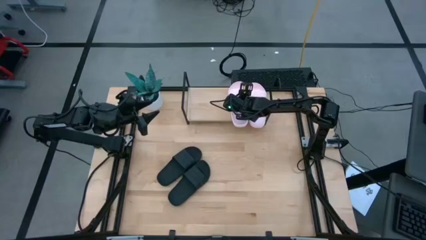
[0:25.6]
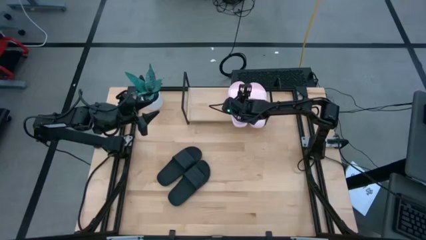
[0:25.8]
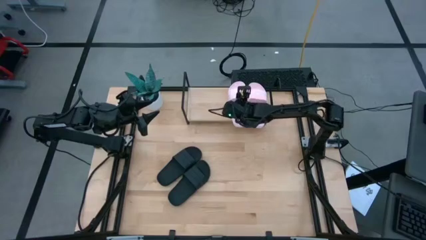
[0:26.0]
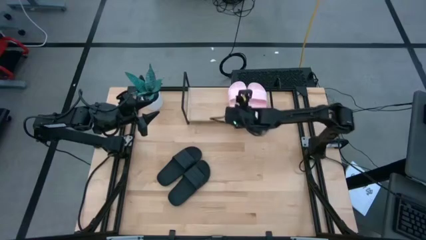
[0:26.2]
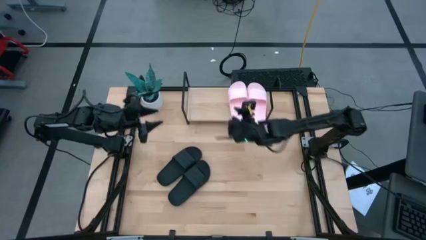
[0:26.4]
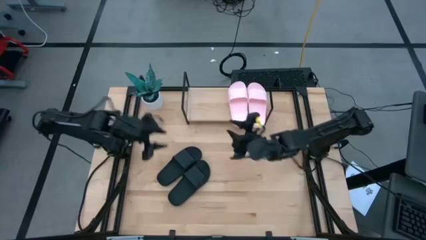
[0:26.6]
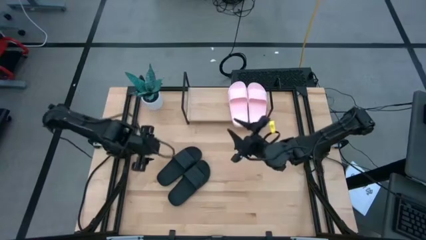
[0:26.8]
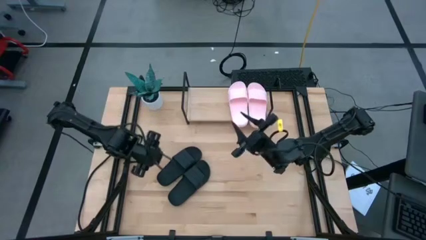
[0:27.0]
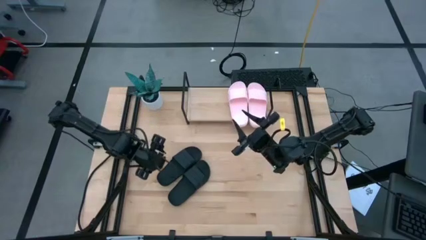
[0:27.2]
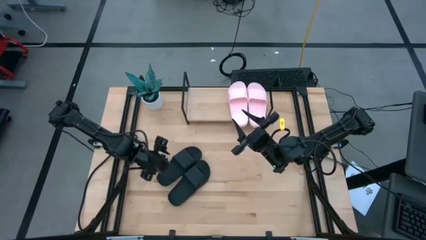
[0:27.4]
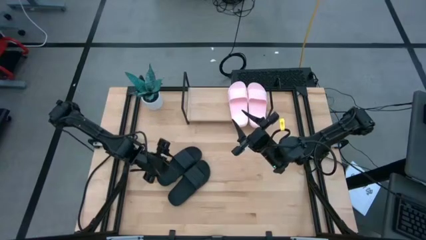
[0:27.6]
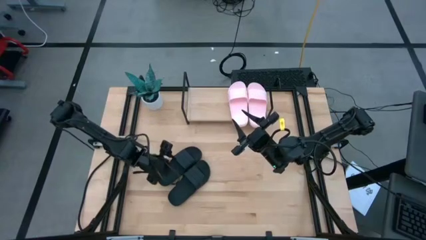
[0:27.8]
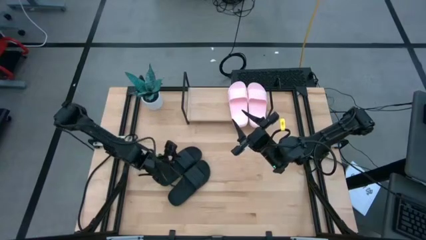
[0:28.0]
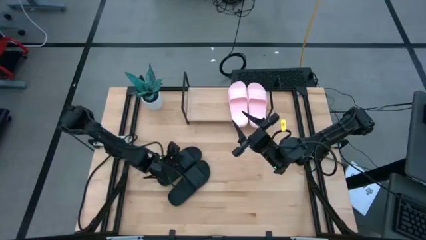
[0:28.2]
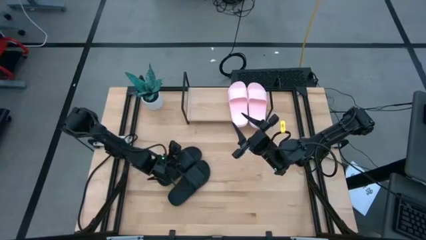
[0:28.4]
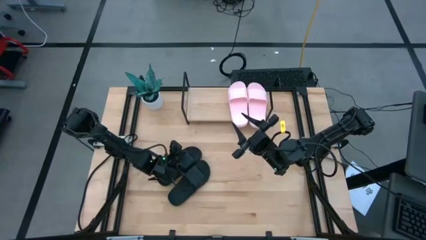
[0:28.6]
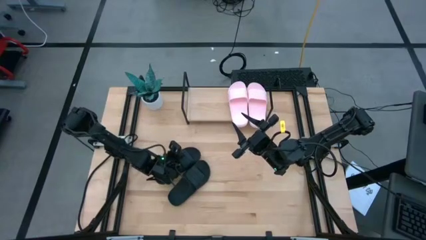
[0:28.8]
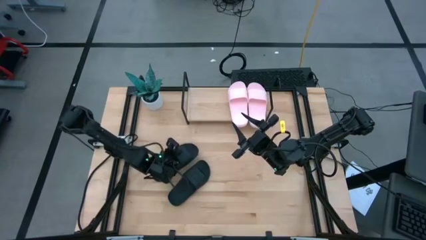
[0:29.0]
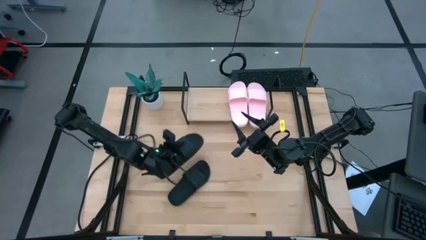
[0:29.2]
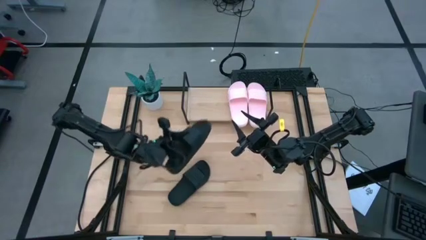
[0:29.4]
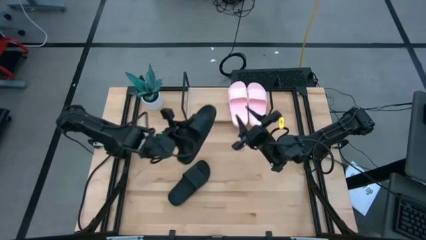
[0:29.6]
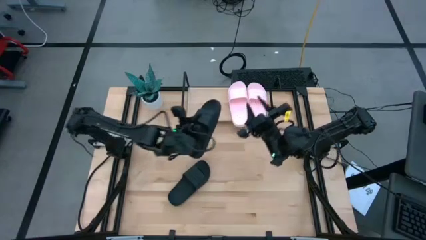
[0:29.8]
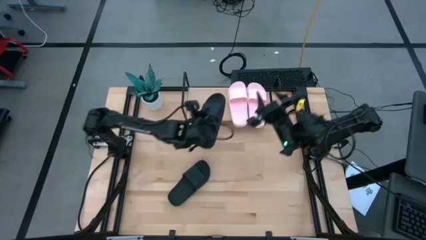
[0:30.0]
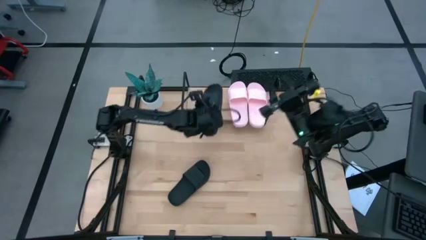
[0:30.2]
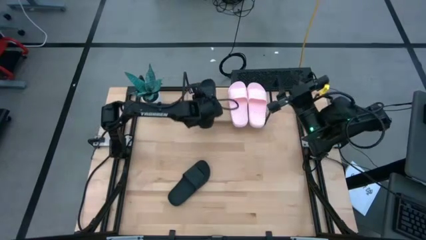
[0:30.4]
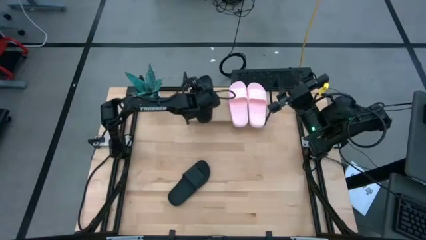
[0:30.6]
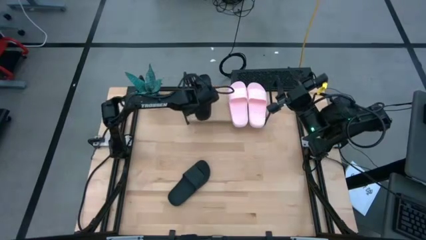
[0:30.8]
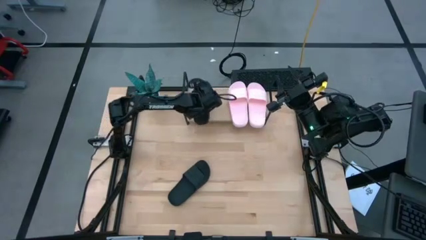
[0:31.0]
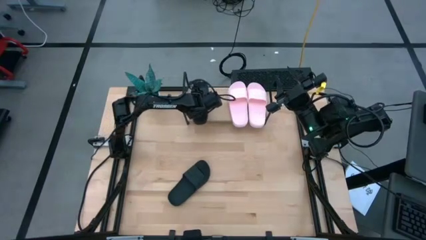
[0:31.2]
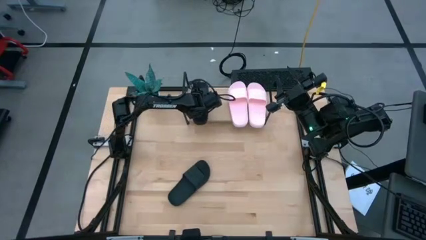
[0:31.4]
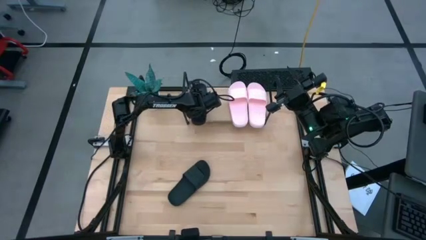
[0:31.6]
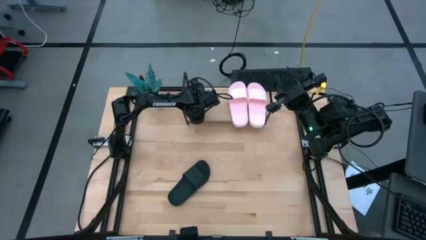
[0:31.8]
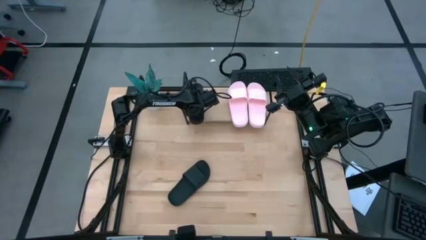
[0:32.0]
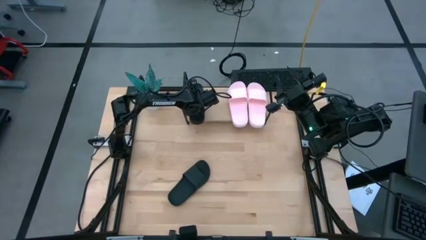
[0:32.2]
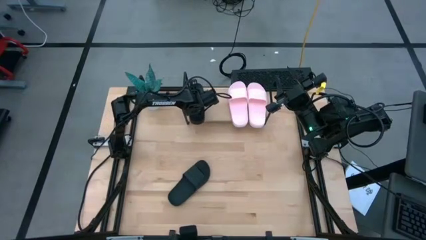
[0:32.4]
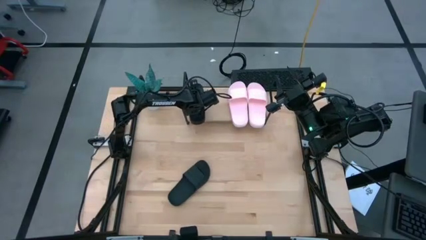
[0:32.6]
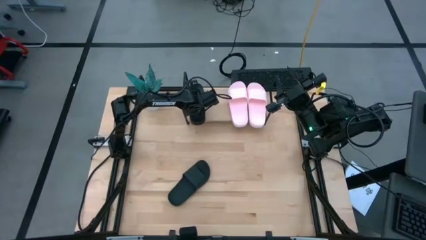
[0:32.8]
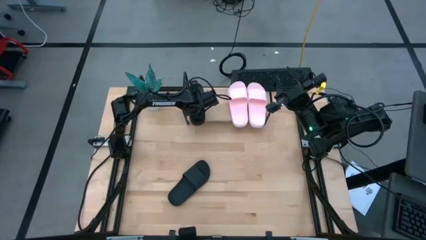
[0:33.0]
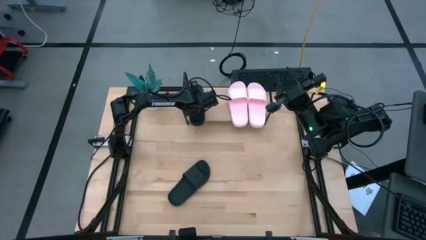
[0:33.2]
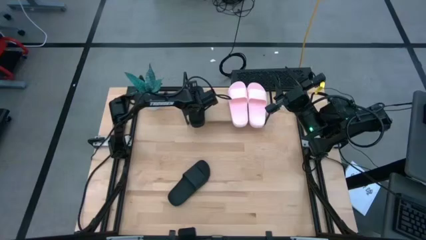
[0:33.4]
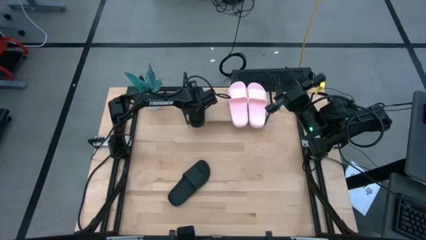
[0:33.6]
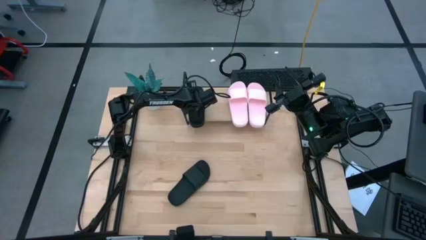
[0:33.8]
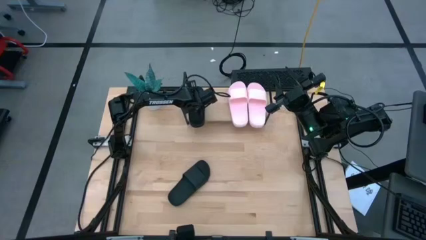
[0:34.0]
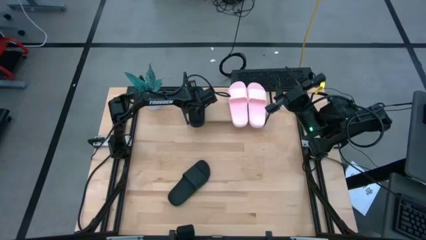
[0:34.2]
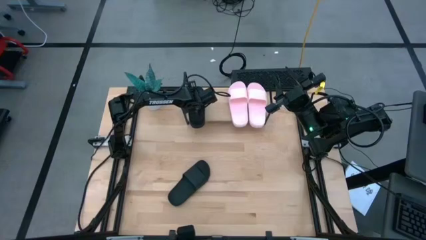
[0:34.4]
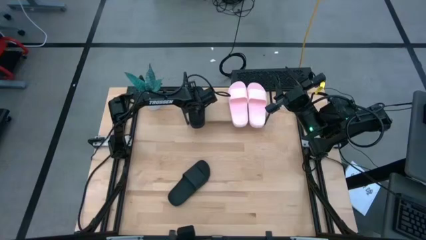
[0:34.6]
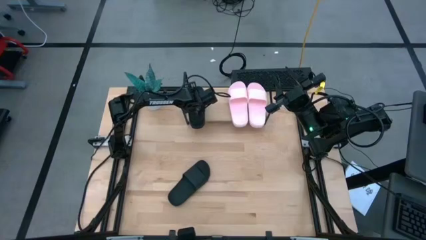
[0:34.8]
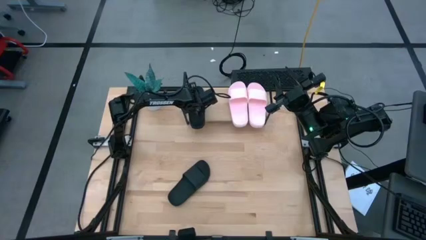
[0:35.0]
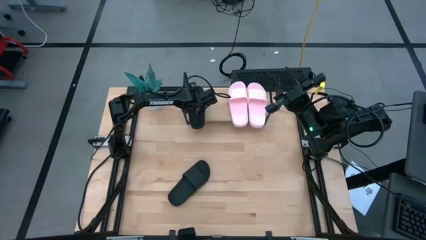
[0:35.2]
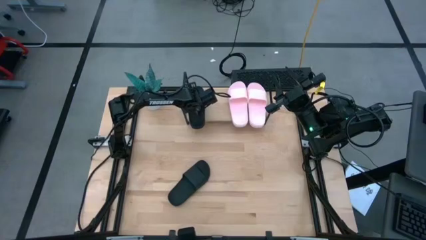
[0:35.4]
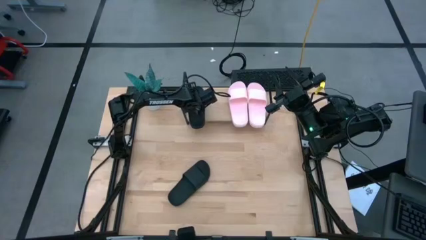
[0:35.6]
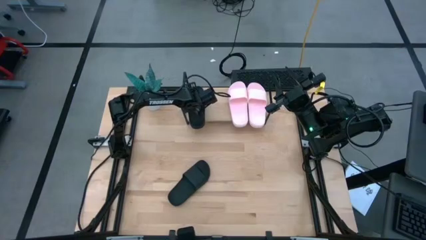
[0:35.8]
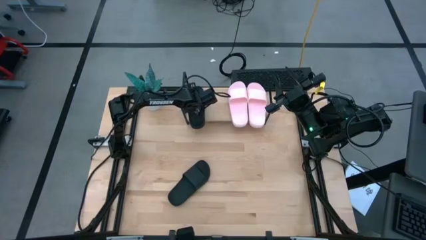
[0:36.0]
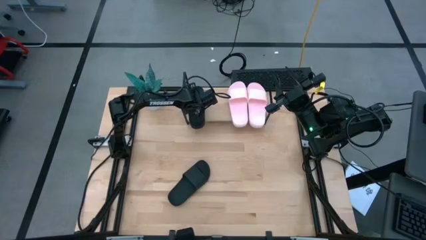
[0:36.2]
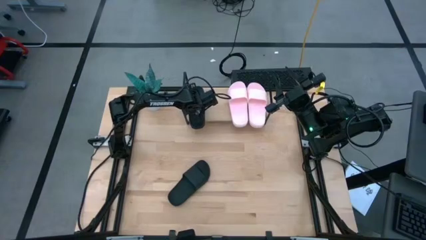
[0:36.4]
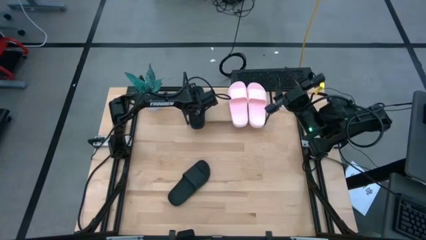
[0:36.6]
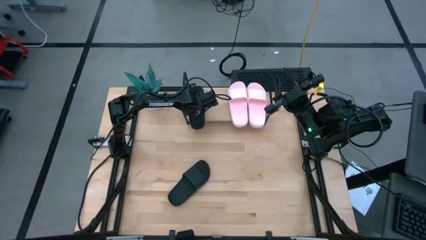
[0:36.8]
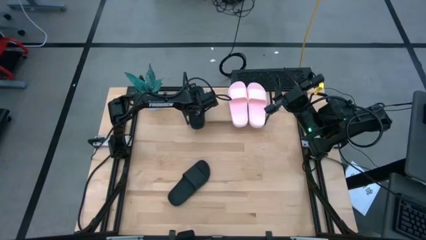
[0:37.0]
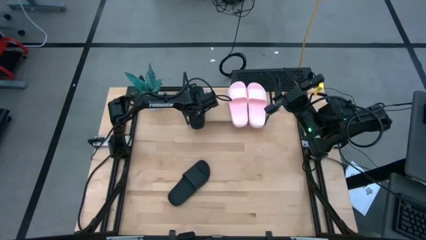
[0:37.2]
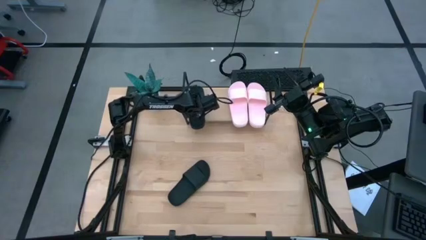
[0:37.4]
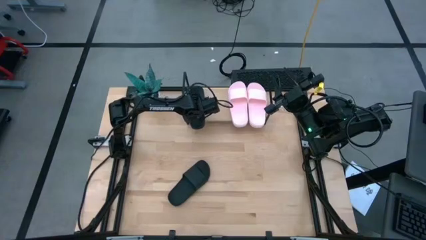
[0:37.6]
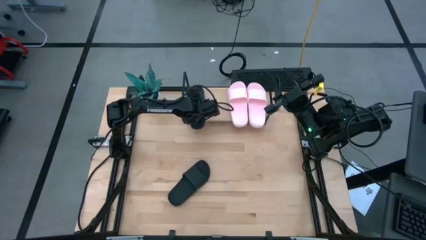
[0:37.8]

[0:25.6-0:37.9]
Task: Pick and place slides into the shelf
Put the left black slipper on the shelf

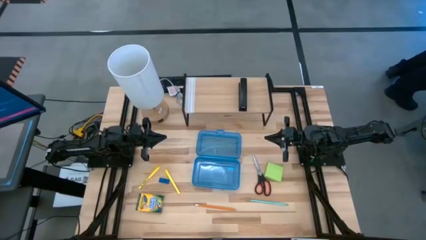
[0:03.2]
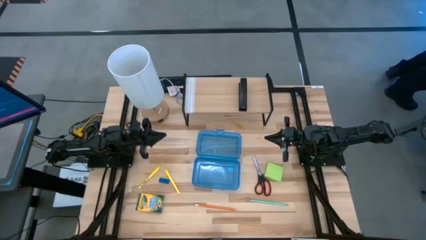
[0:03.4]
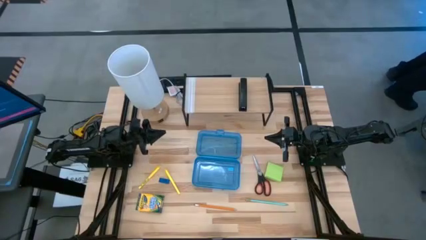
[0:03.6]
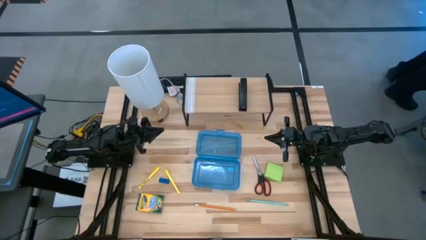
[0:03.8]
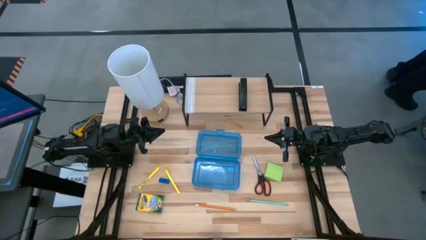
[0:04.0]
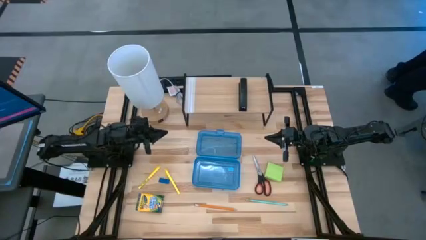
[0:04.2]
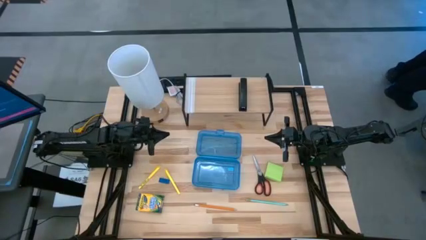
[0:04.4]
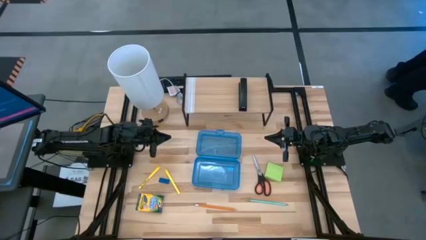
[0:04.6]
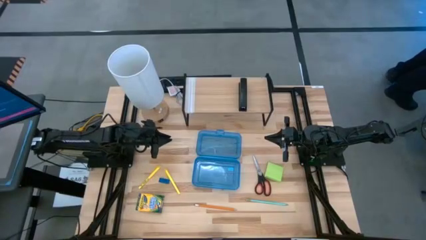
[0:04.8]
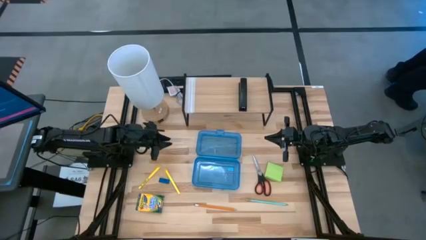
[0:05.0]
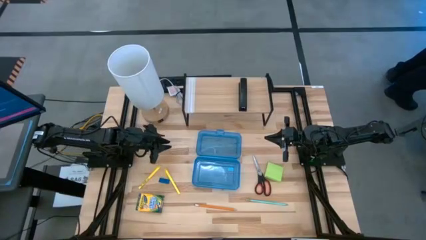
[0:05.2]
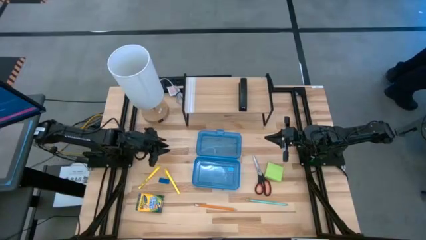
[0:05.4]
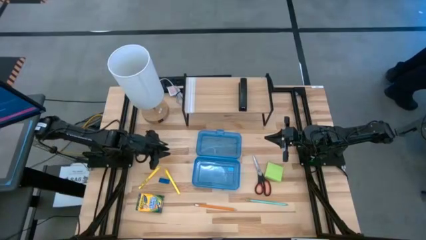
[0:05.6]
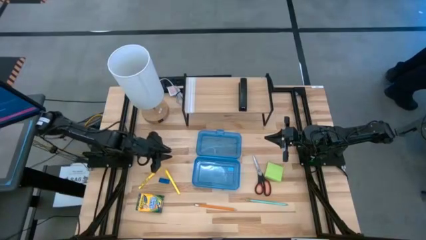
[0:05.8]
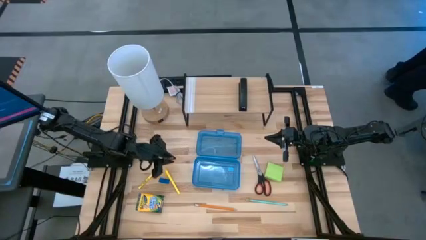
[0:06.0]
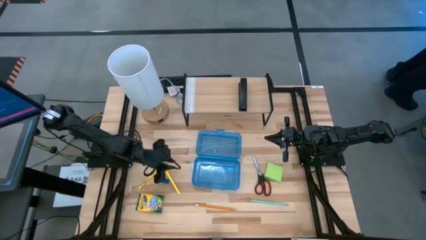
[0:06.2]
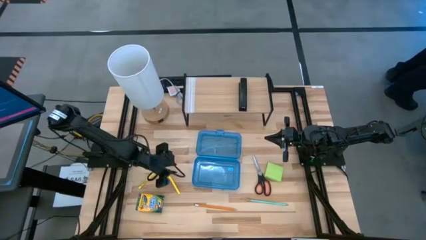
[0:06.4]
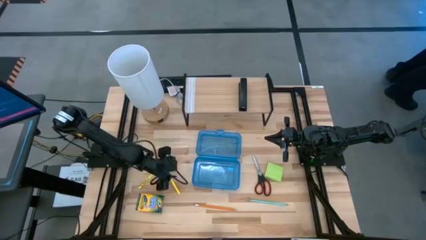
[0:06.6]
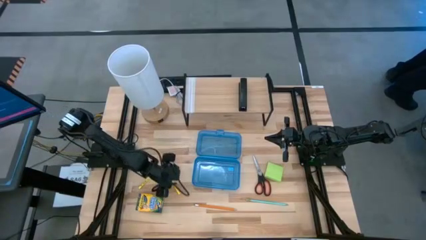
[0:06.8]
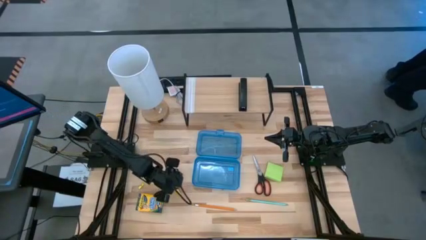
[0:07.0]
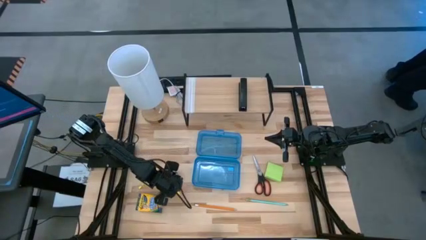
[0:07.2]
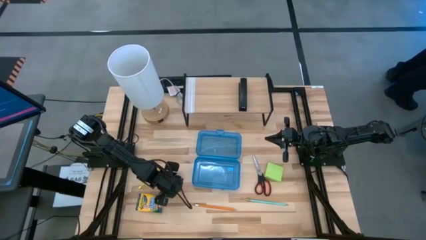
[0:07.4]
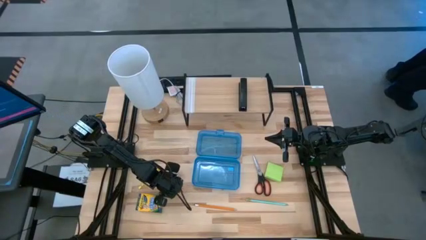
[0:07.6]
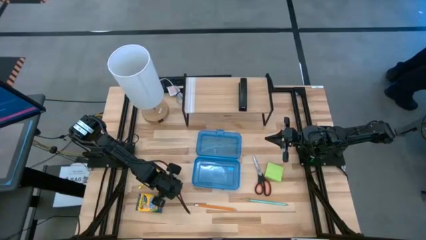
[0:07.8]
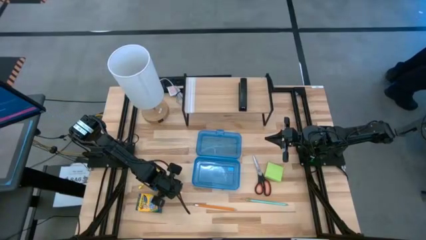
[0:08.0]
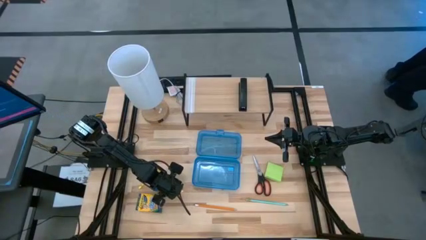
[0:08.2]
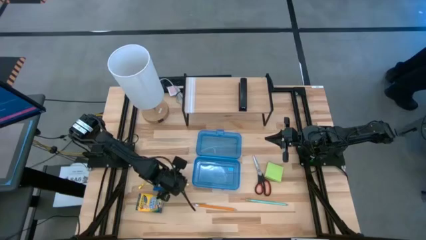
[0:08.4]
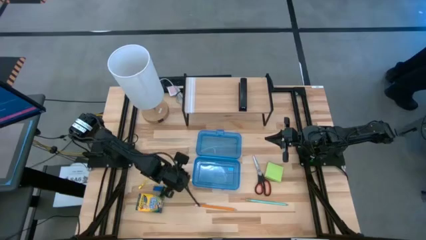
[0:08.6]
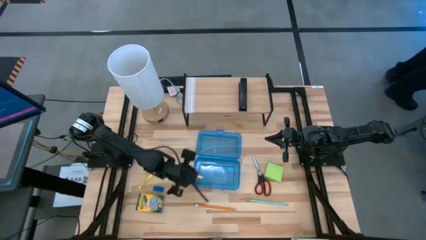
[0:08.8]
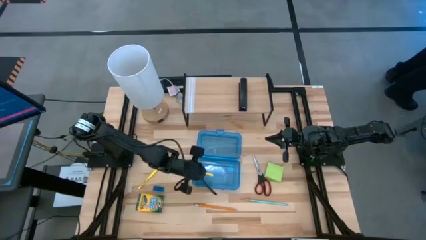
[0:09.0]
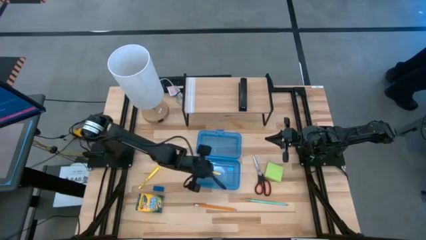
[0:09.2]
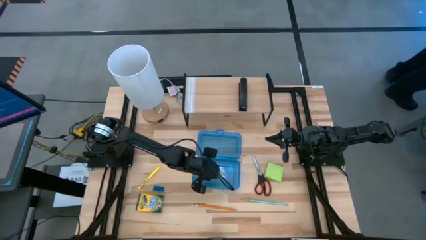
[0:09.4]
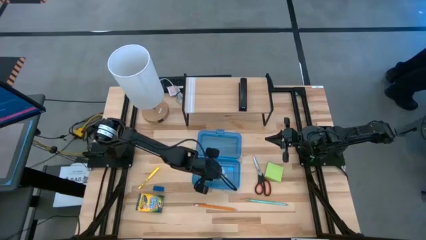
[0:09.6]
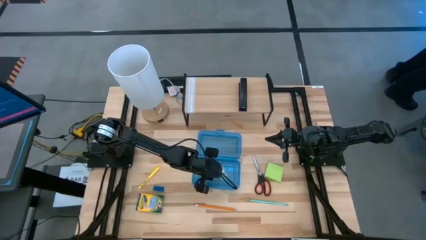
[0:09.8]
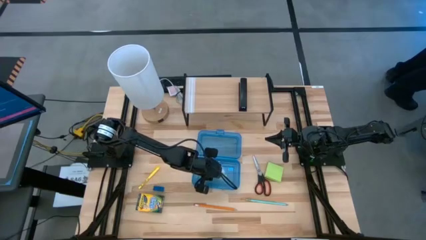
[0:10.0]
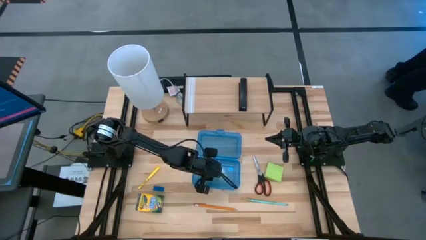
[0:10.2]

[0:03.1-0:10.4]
Task: Pack school essentials
Put the right yellow pen into the blue supply box
